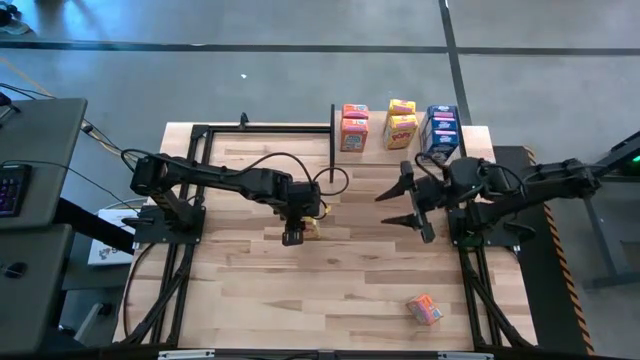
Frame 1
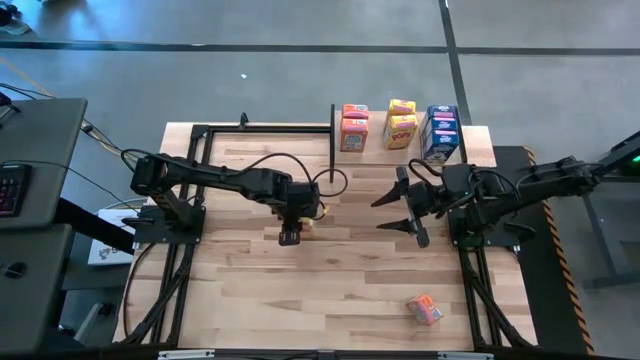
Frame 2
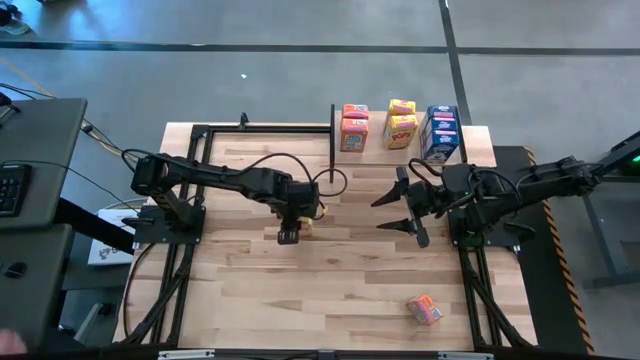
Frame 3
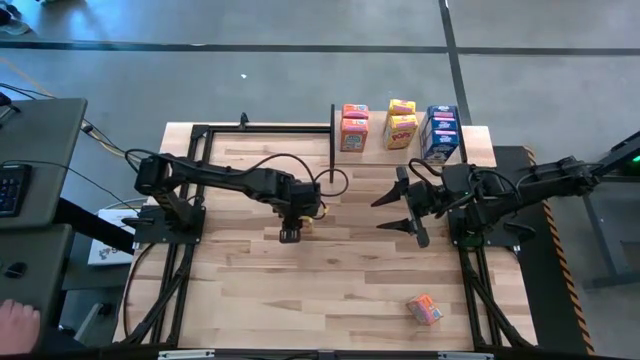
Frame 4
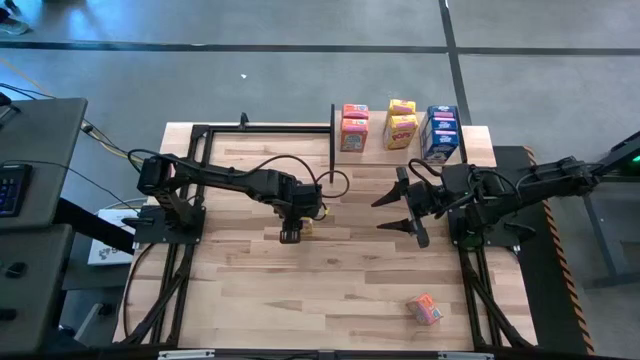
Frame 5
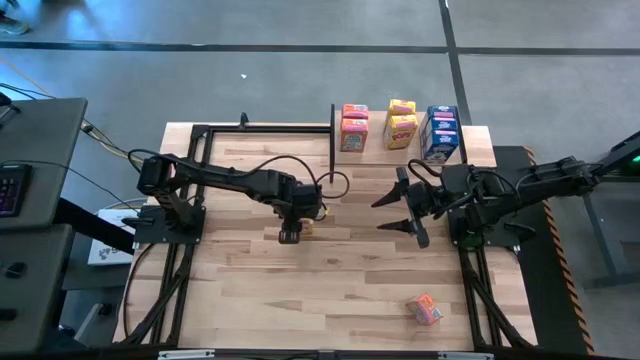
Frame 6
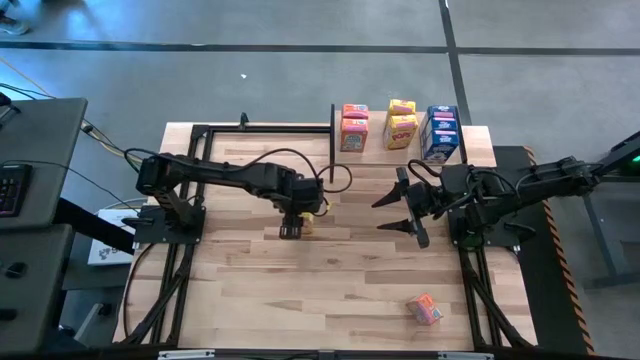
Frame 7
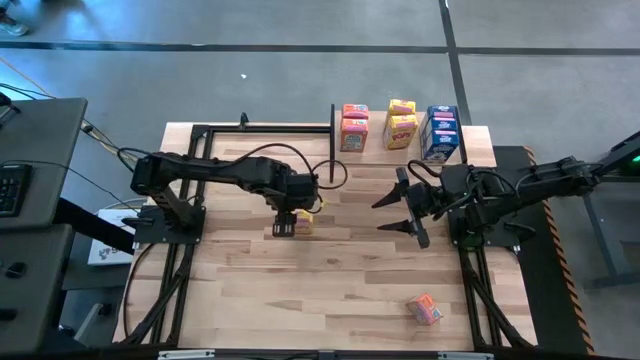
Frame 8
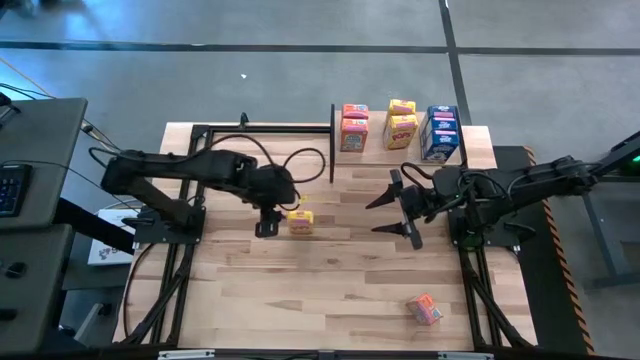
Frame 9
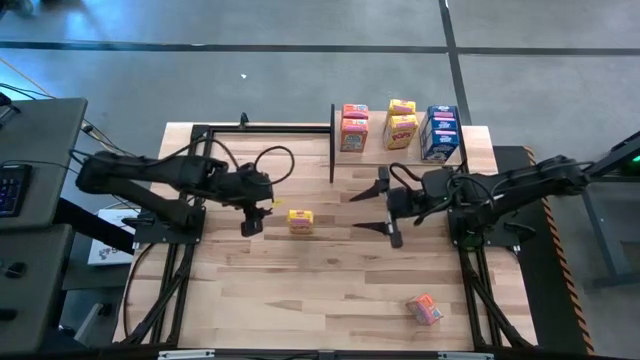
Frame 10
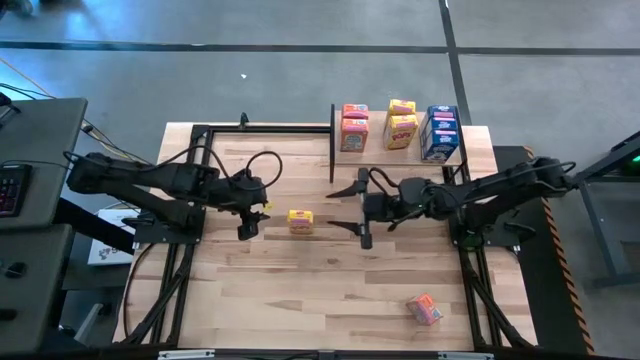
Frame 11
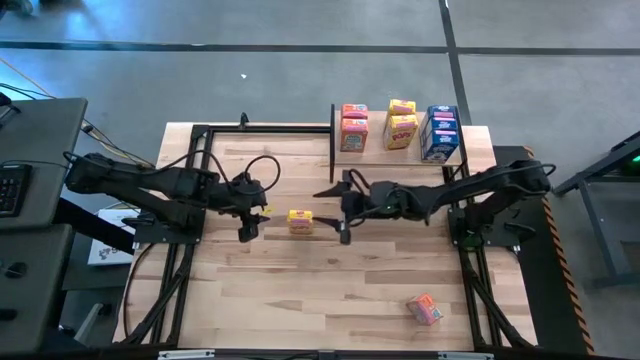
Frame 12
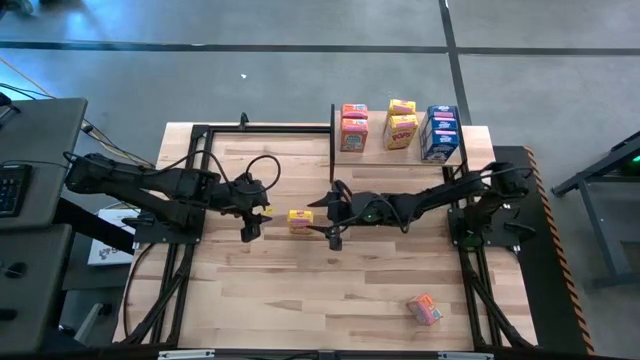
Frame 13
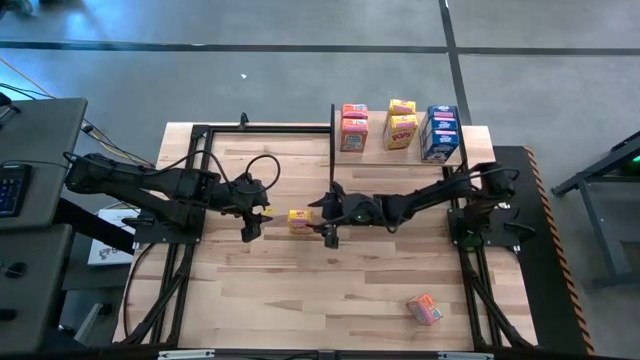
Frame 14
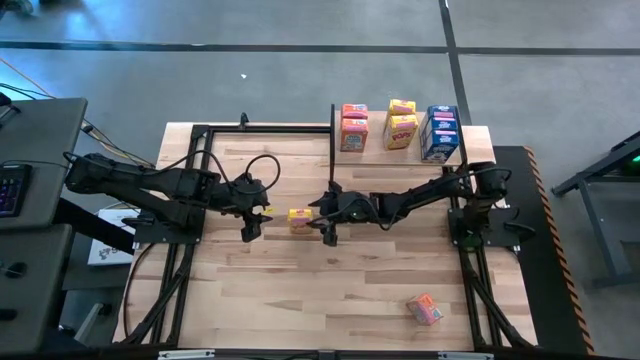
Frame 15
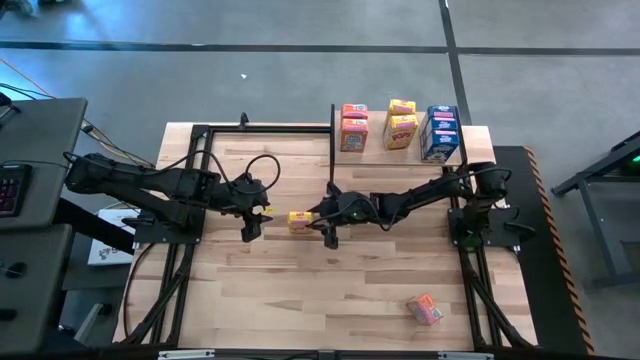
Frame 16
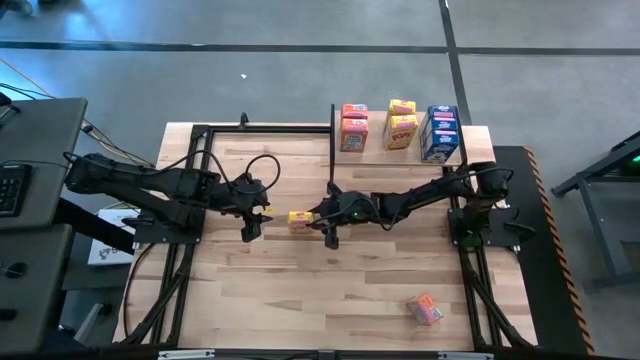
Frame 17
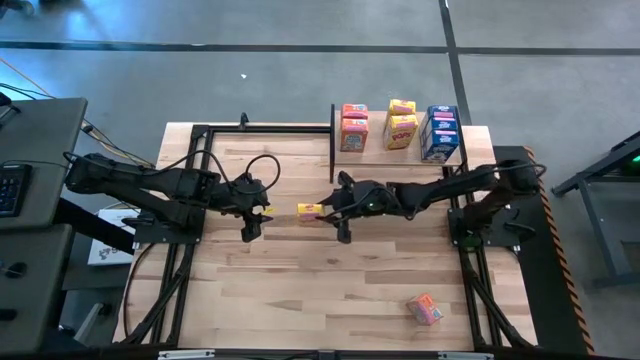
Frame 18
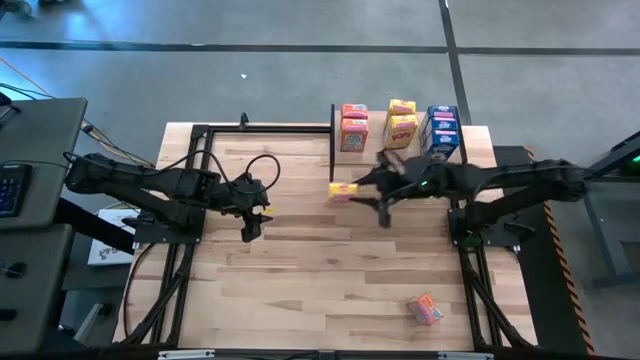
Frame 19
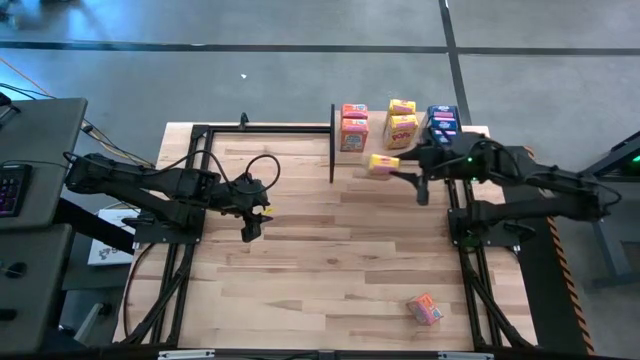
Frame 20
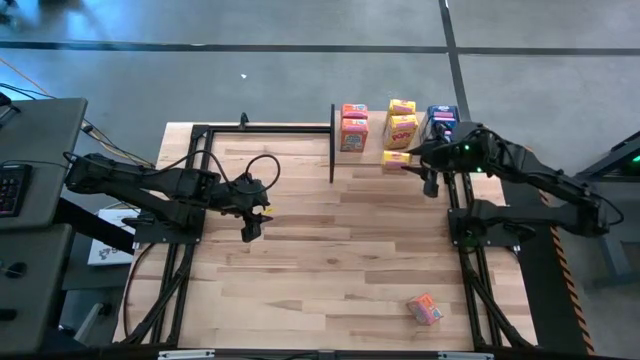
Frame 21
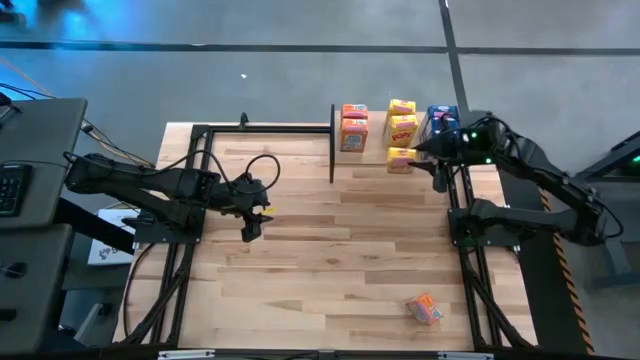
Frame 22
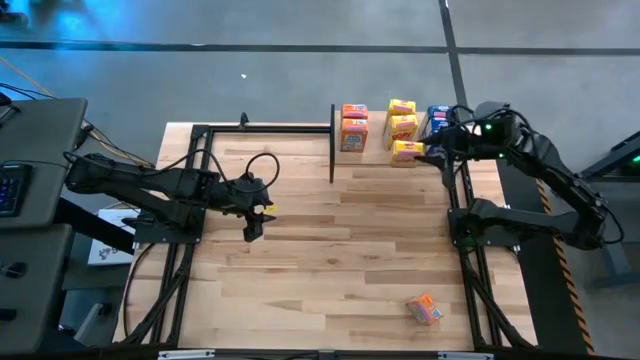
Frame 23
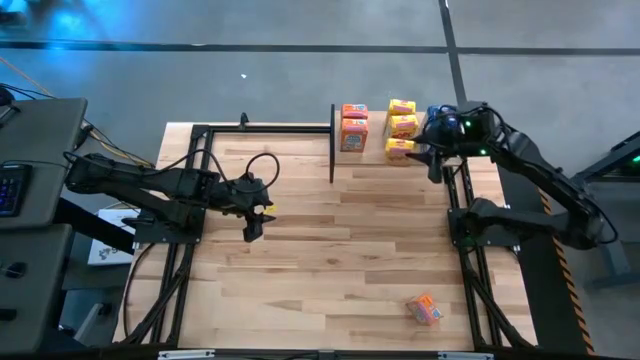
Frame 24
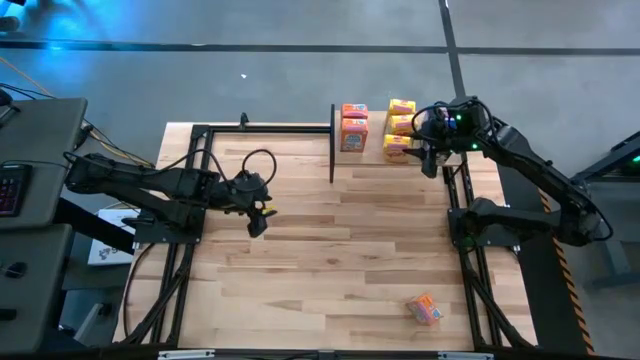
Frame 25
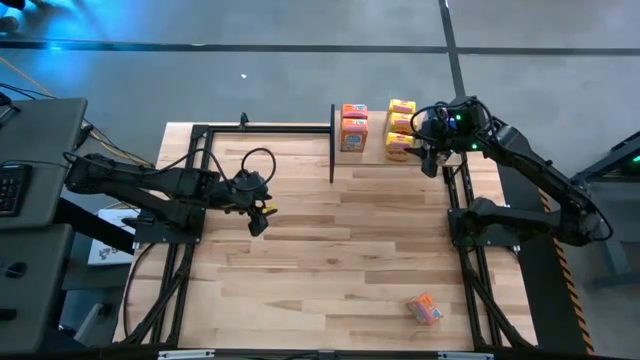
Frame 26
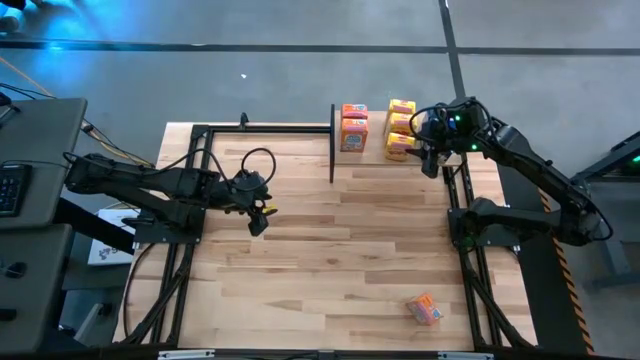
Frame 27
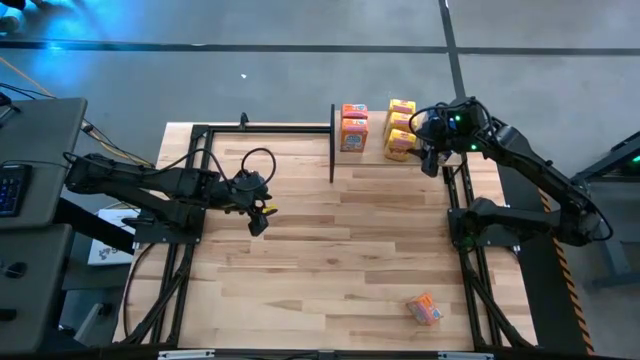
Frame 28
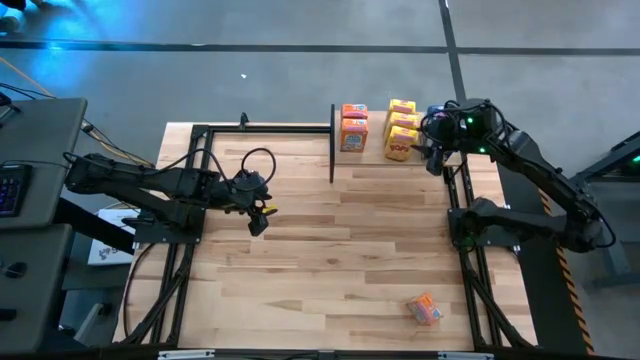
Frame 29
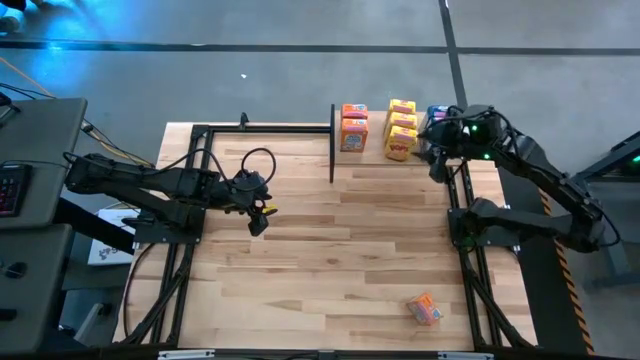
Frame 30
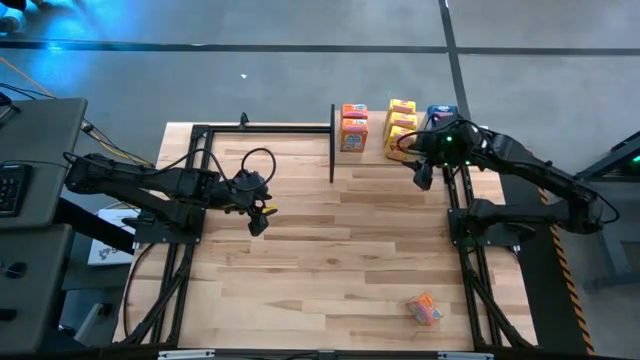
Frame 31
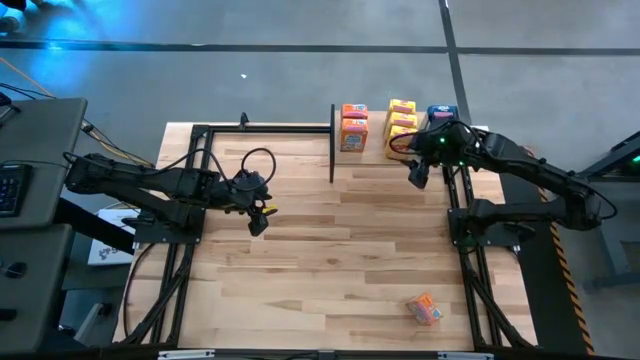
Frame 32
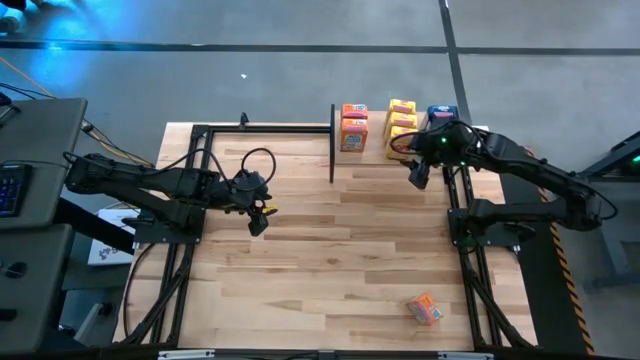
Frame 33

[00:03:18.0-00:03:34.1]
Task: Stack cereal on shelf
Put the yellow cereal box on the shelf aligned with the other yellow cereal boxes

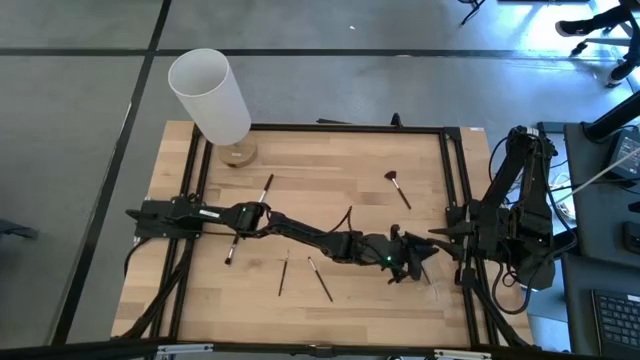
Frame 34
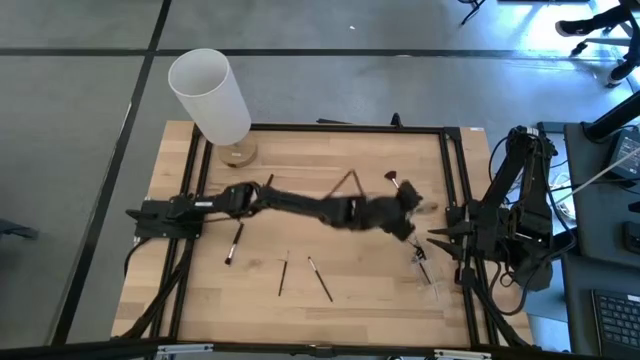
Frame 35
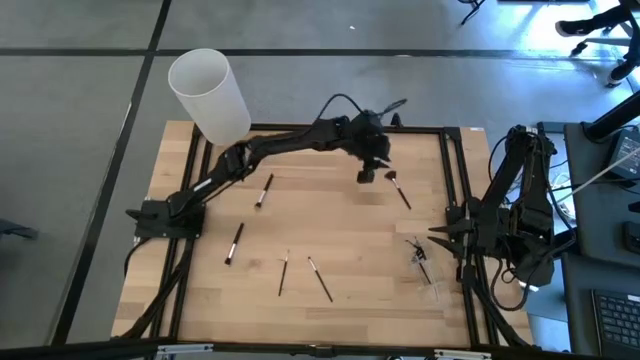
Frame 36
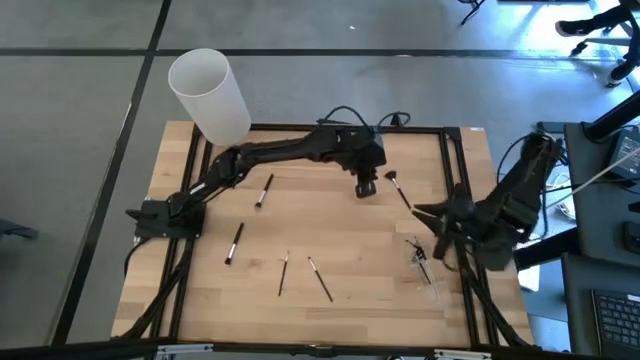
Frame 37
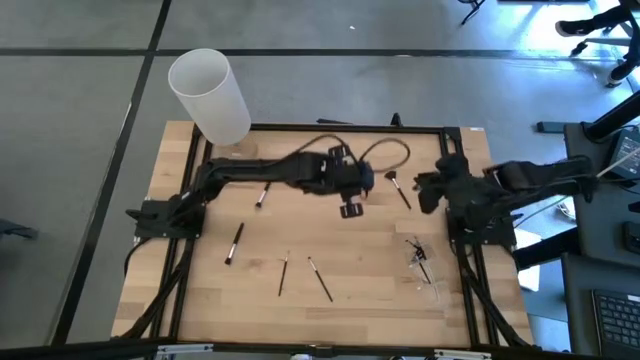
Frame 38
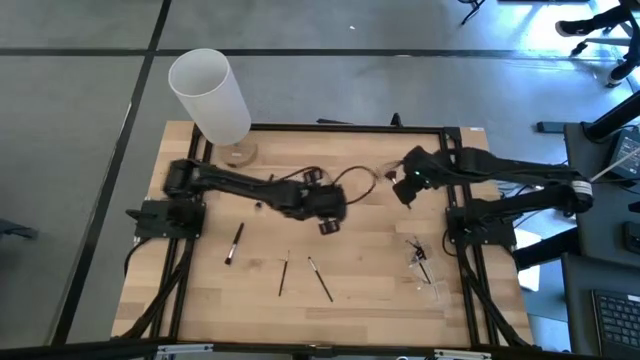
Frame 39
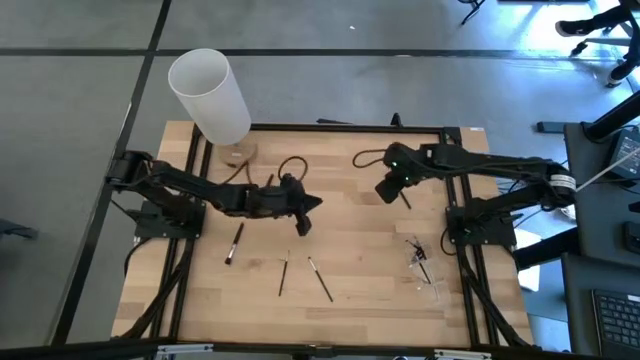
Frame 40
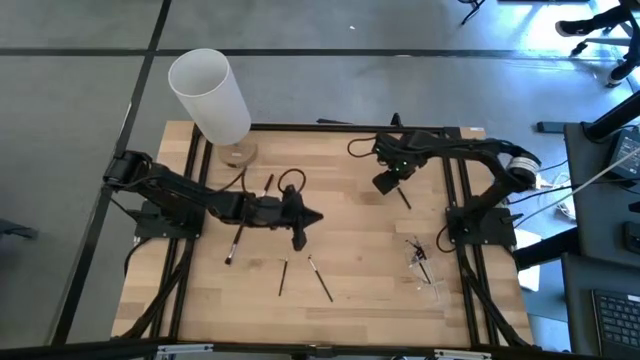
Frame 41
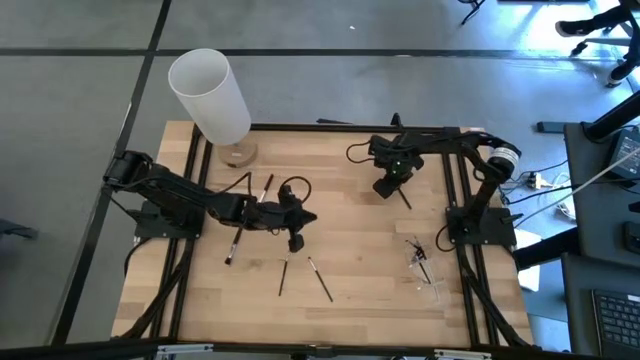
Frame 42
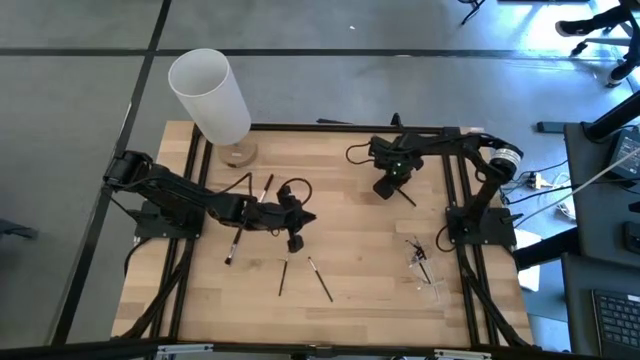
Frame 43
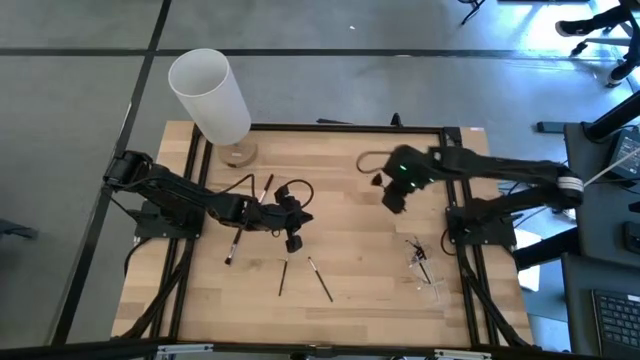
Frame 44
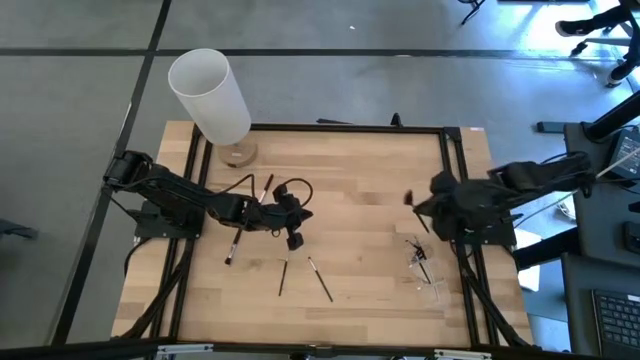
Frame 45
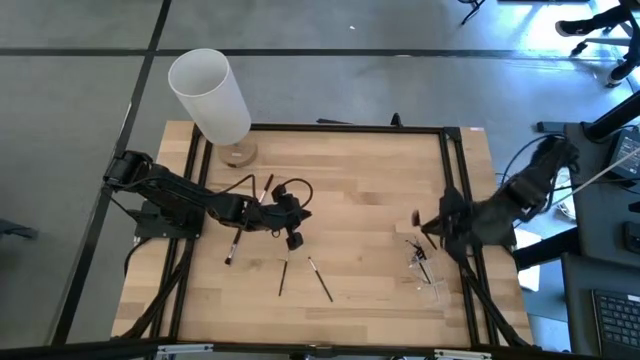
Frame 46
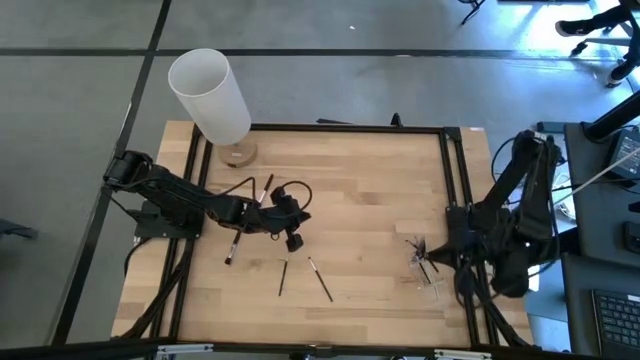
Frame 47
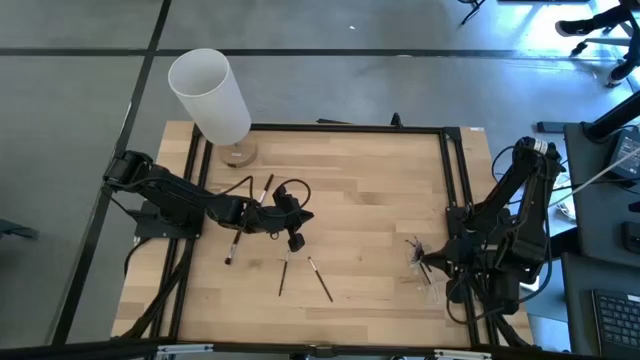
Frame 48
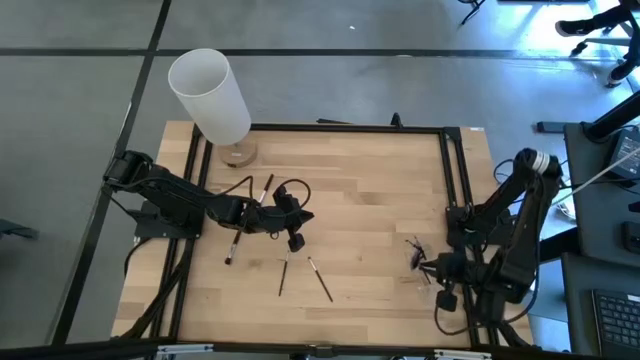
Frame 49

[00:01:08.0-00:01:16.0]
Task: Put items in baskets/containers
Put the black highlighter brush into the transparent organizer
